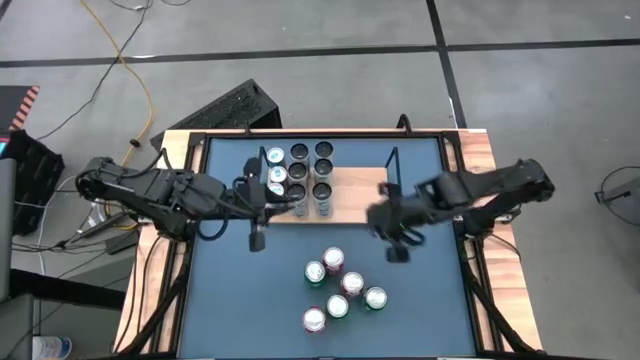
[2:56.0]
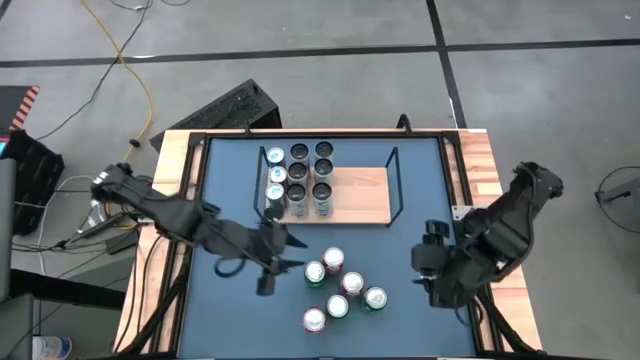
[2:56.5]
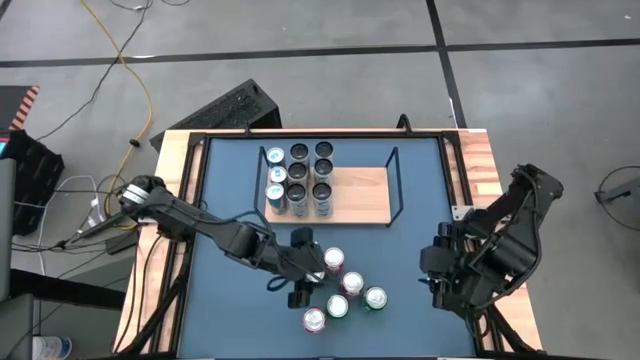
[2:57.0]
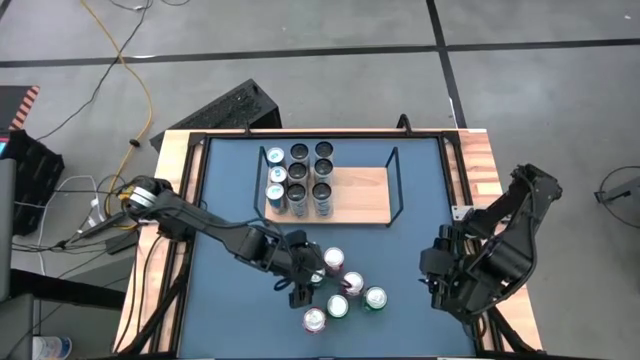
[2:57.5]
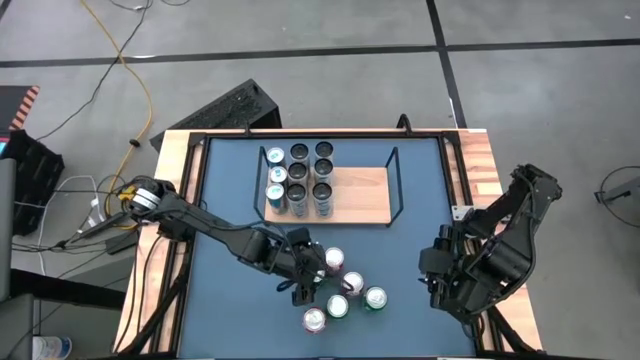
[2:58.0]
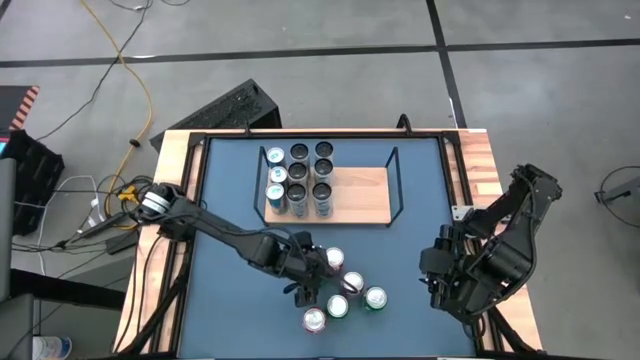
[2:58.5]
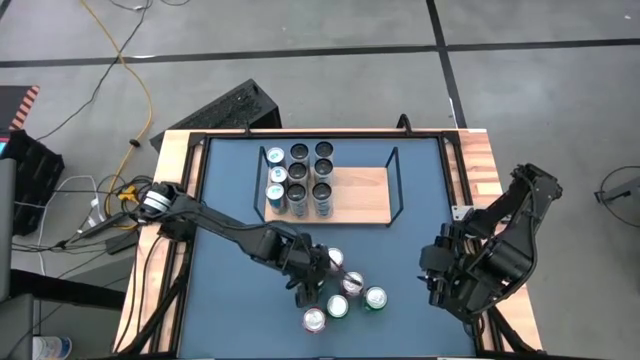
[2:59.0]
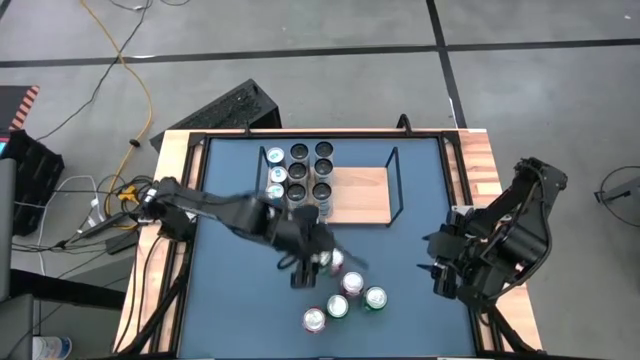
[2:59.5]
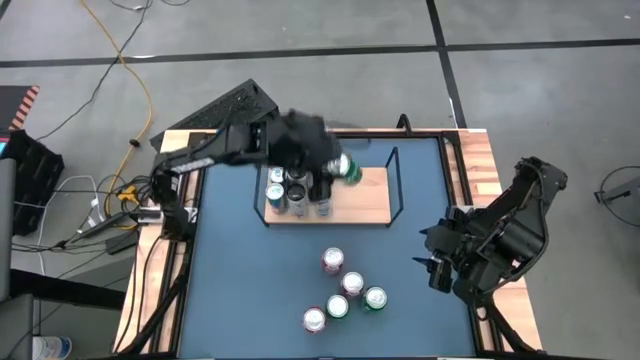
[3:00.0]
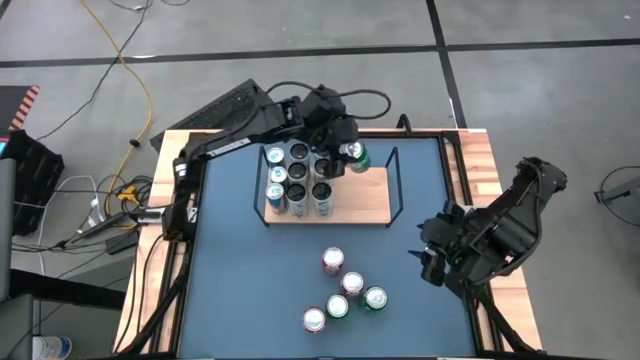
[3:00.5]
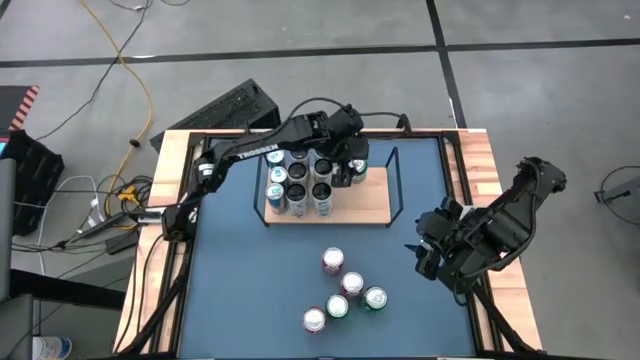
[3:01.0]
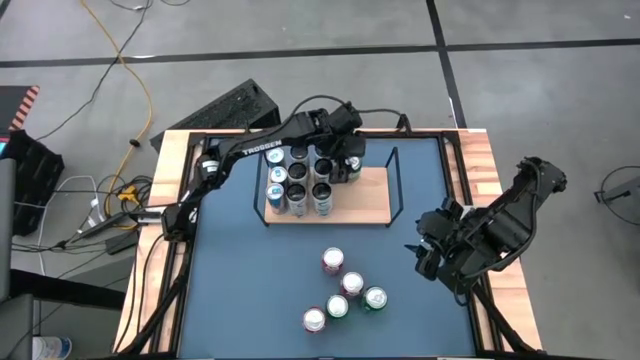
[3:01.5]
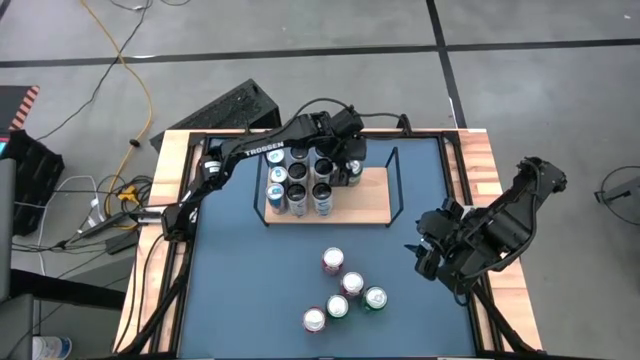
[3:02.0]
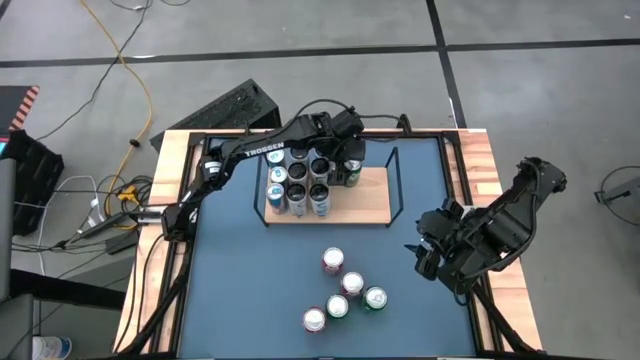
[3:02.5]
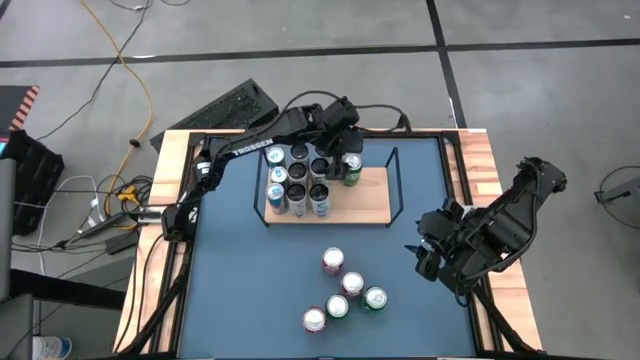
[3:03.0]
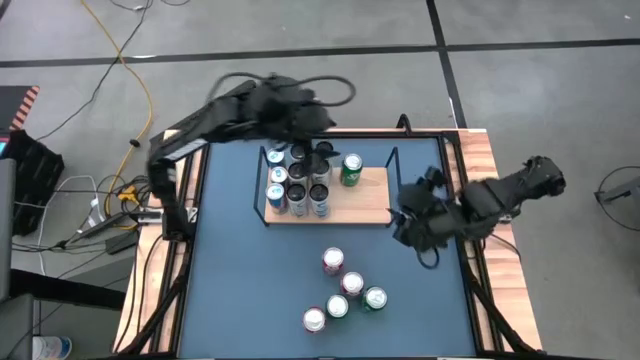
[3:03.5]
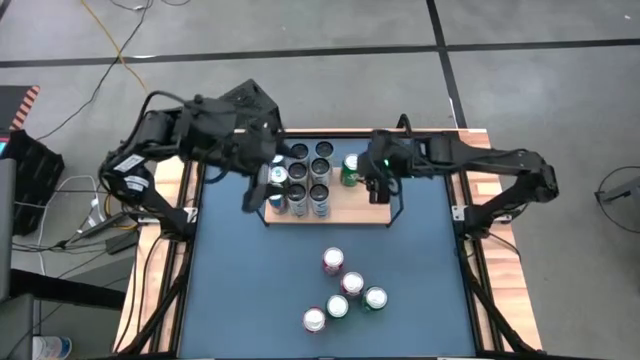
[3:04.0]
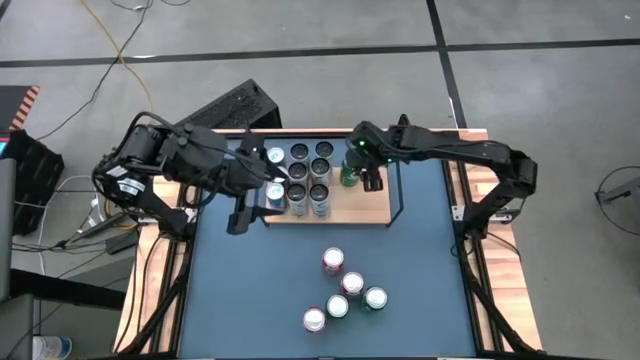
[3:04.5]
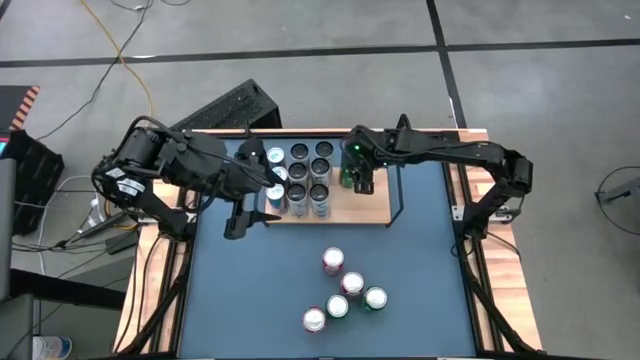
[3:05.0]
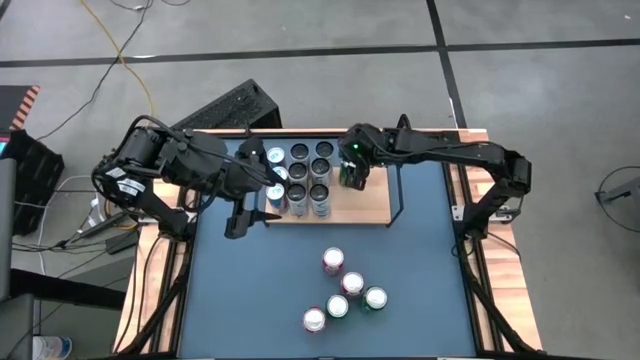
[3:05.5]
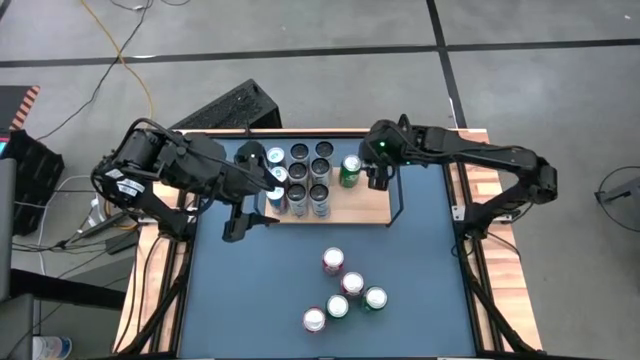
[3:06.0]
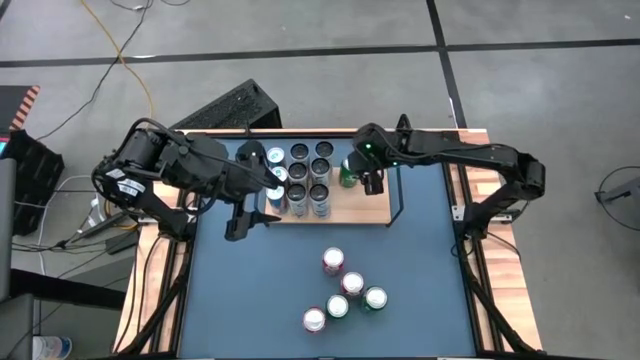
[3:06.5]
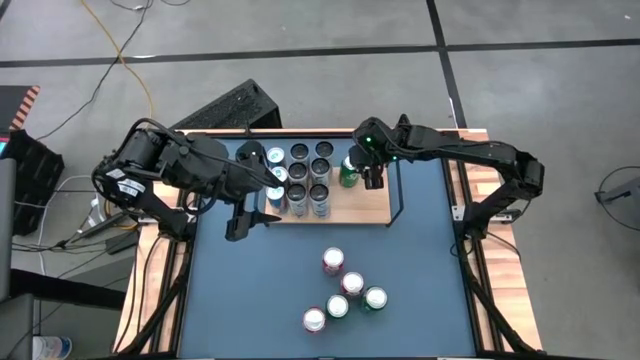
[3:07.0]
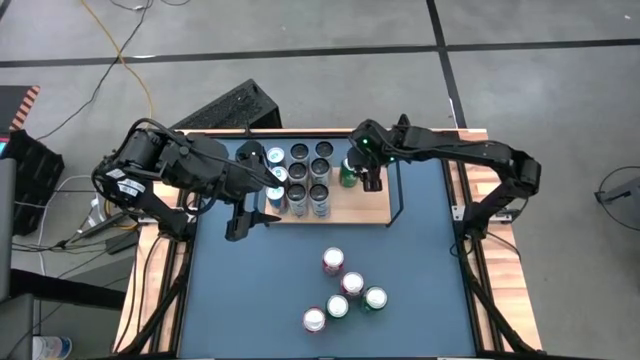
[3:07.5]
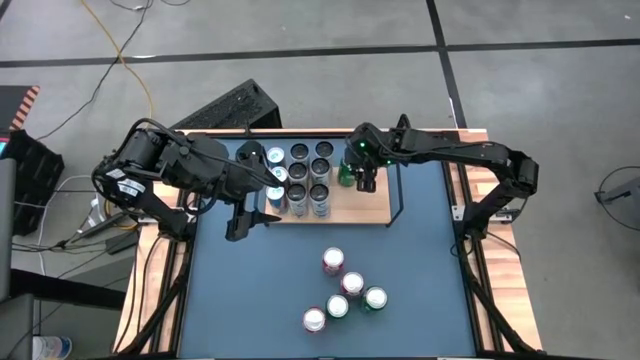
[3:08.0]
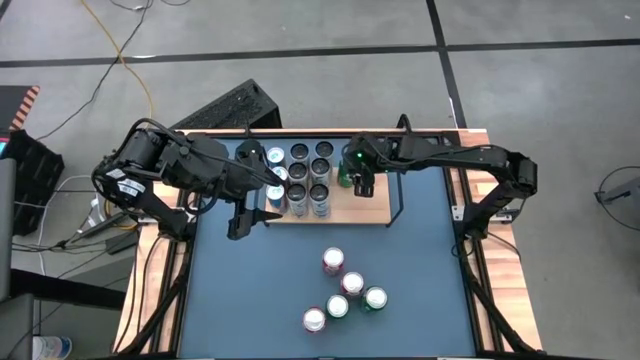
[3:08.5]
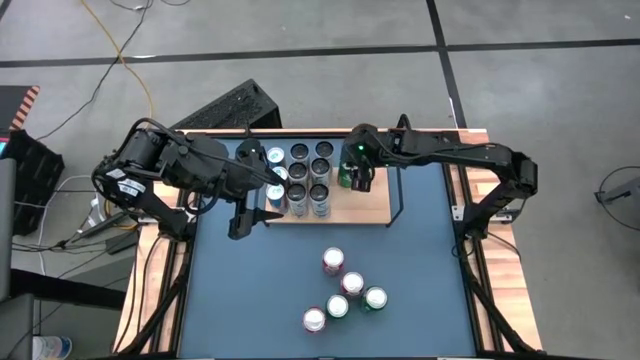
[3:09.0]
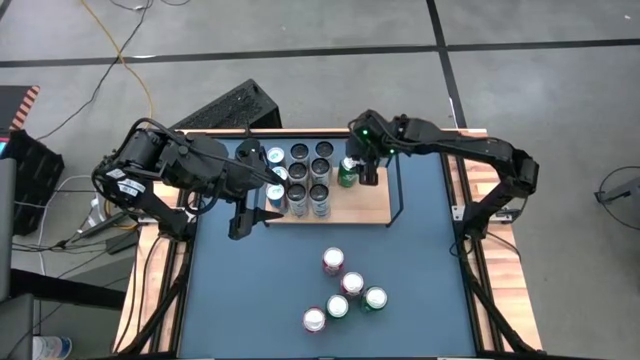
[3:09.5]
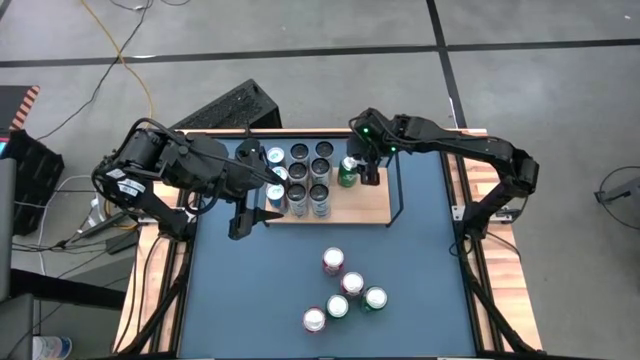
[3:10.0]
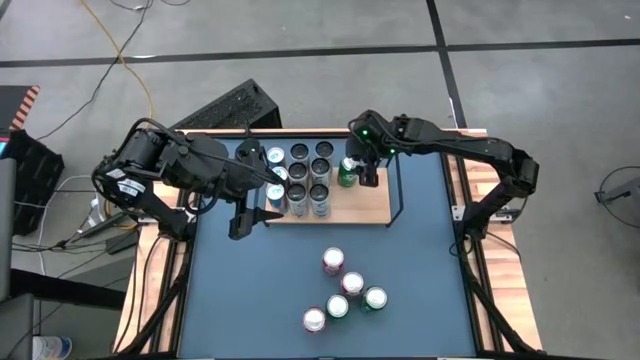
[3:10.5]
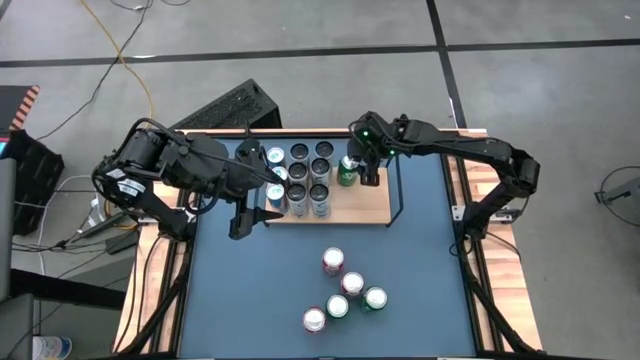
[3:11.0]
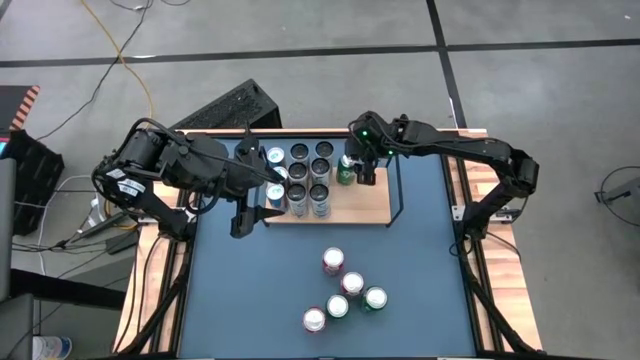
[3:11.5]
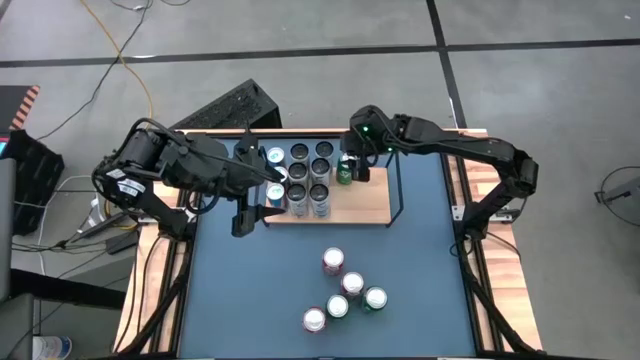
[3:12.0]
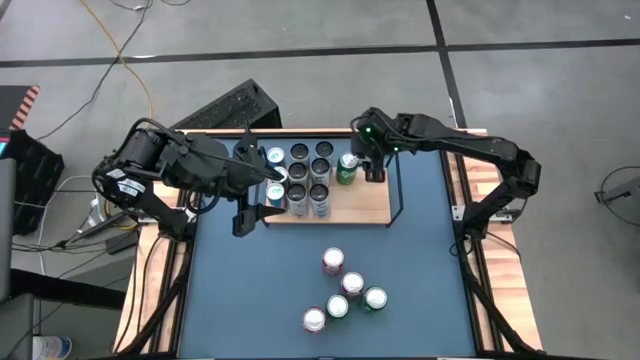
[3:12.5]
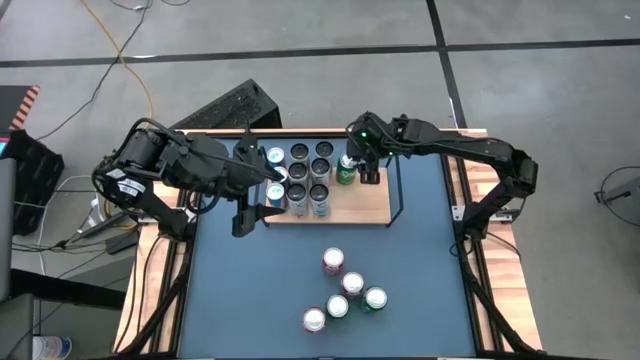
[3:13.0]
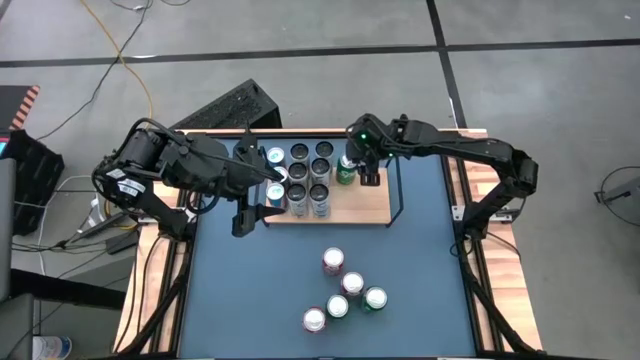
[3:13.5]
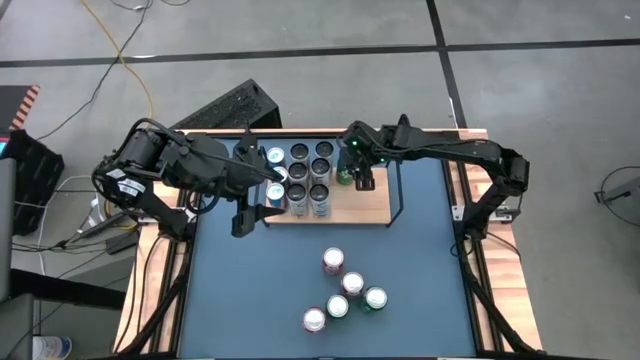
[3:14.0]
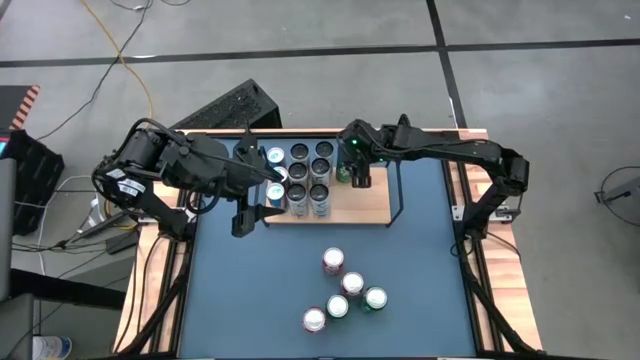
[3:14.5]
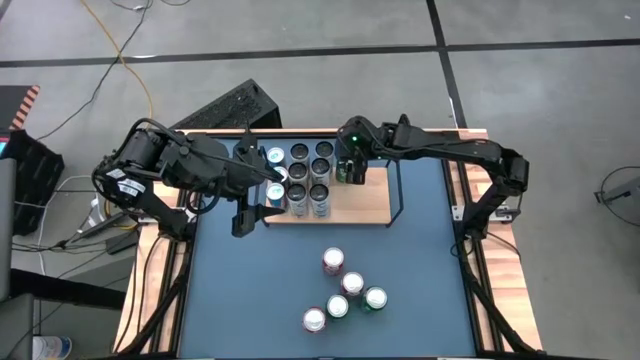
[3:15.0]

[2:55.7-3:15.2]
Task: Place canned beverage on shelf
Put the left green soda can on the shelf
